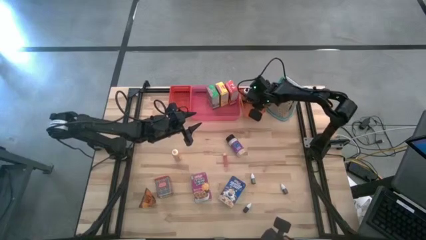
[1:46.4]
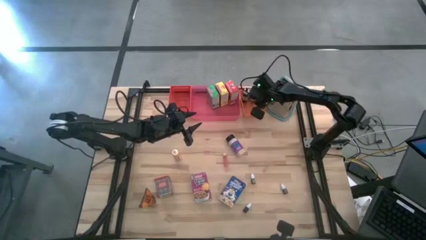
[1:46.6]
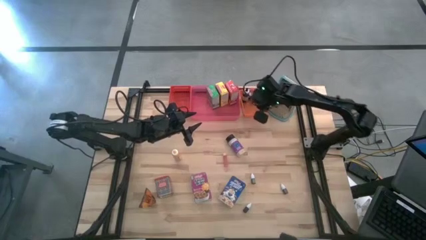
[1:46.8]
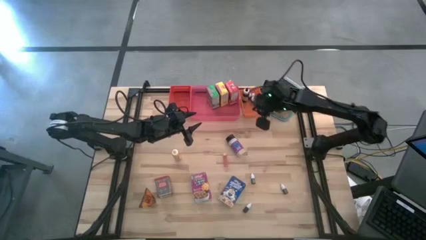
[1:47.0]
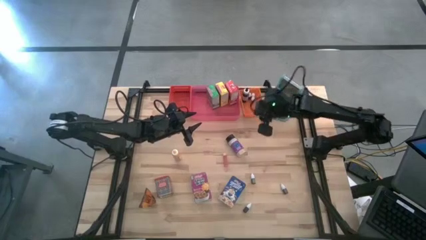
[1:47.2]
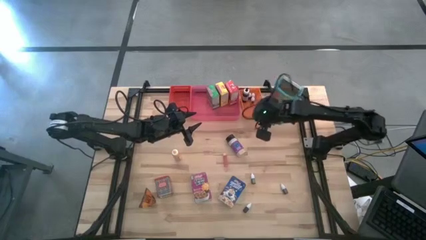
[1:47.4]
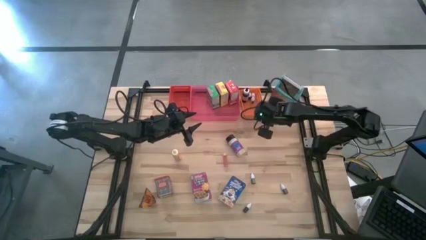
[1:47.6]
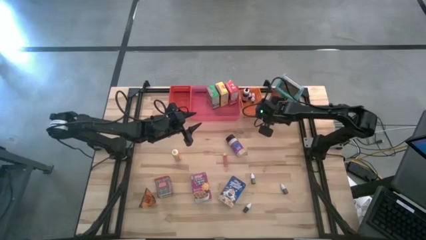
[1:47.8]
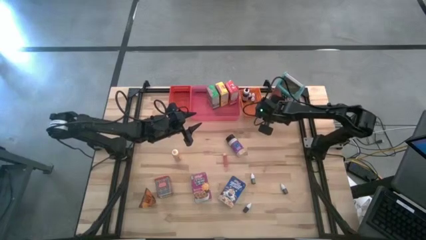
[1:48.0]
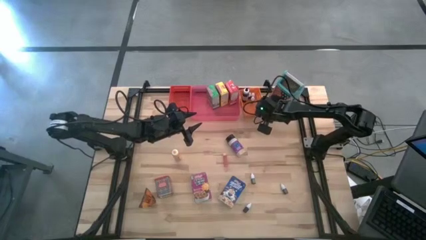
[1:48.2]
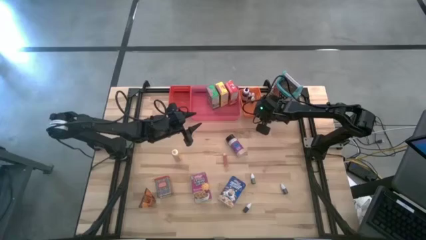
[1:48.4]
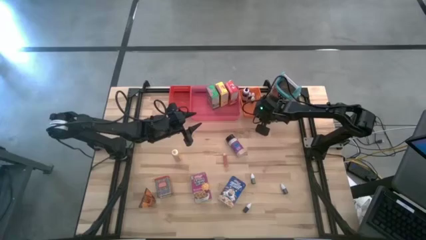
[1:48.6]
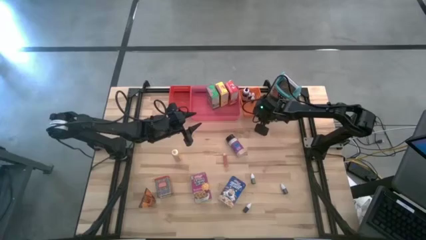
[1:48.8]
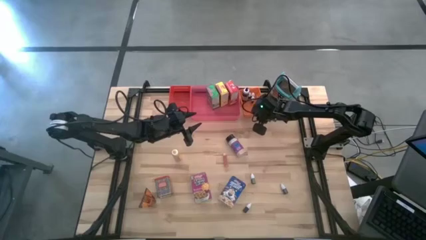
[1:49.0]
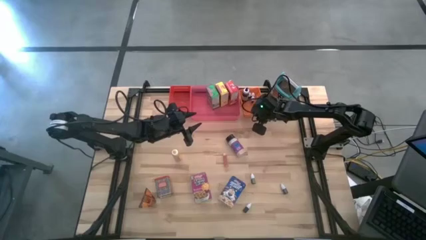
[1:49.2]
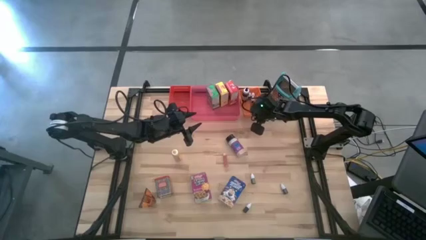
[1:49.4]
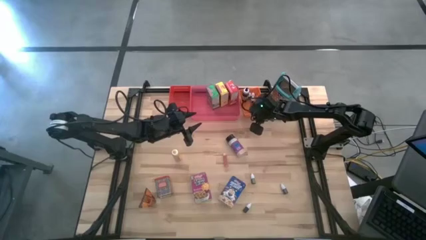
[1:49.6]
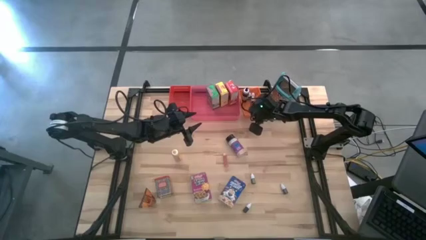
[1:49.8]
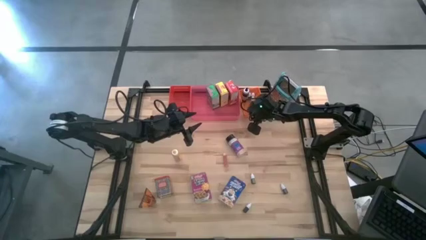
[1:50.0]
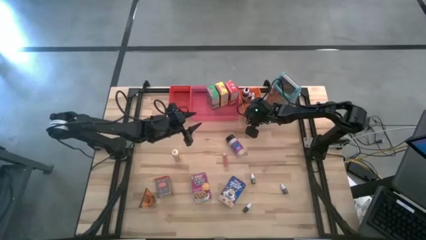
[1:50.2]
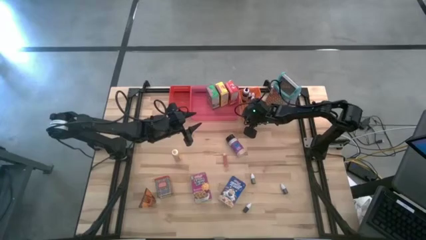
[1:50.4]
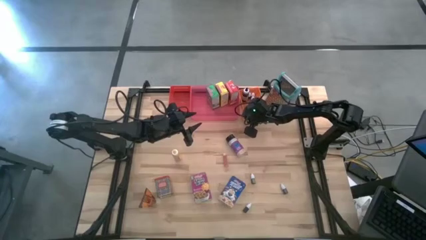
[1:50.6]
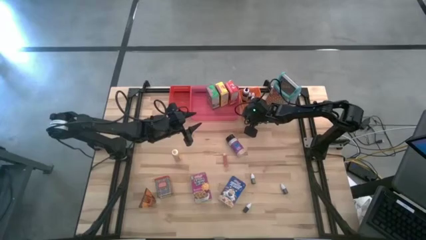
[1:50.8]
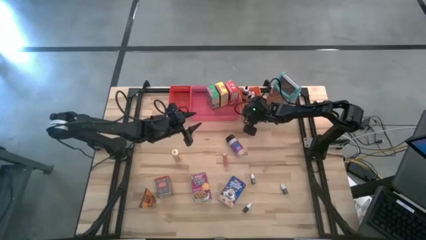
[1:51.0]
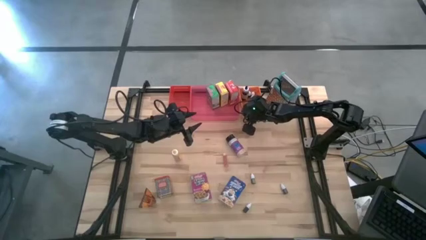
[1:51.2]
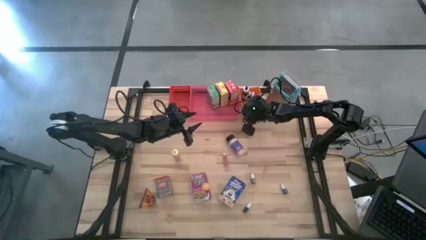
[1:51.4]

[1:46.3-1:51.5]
Task: Pick & Place Kitchen Items
Adjust the orange bin

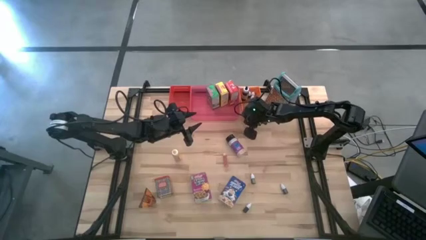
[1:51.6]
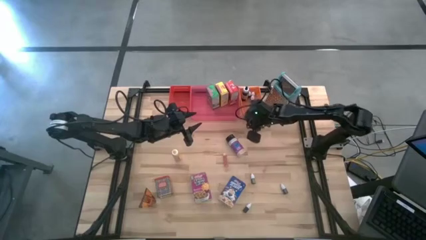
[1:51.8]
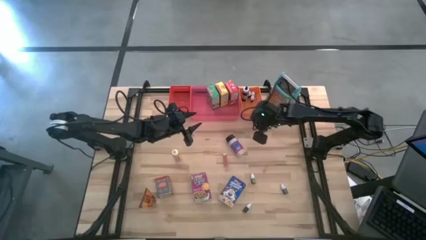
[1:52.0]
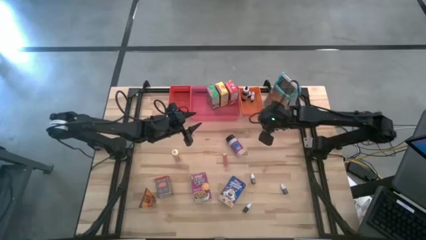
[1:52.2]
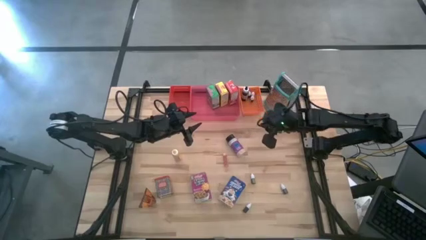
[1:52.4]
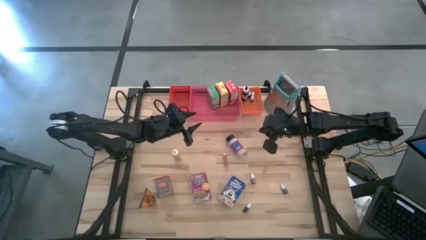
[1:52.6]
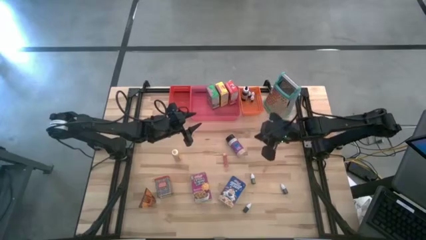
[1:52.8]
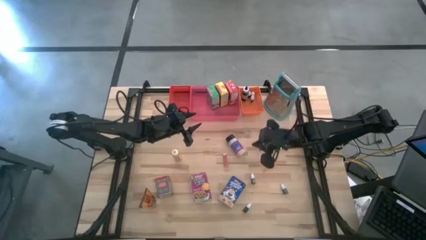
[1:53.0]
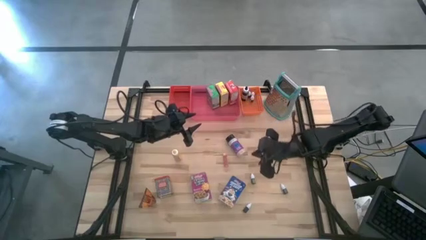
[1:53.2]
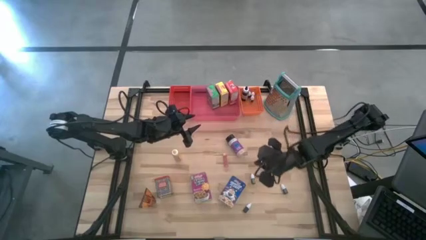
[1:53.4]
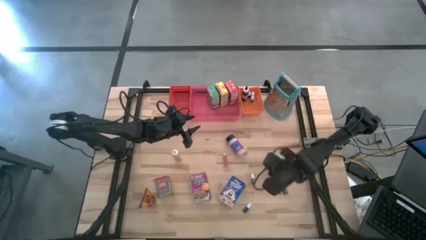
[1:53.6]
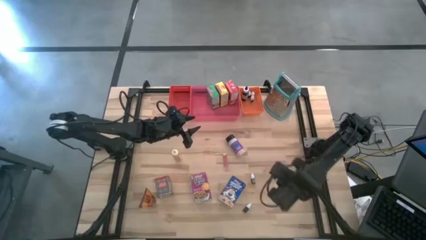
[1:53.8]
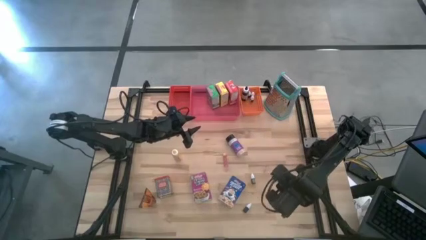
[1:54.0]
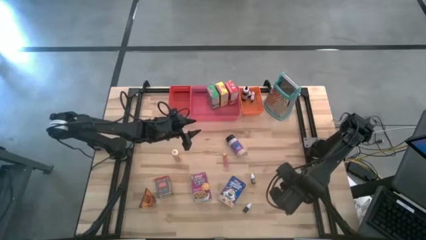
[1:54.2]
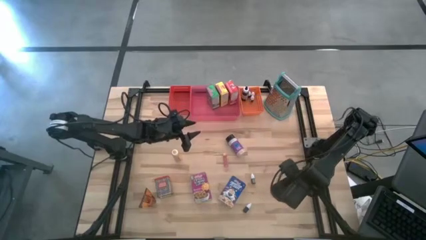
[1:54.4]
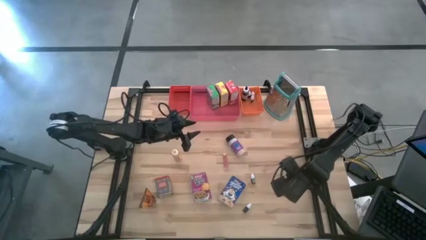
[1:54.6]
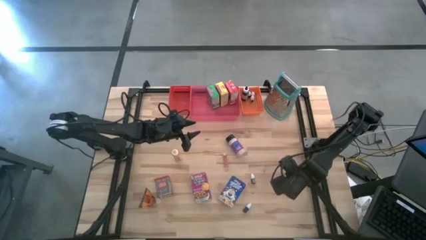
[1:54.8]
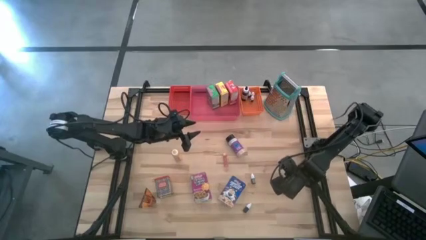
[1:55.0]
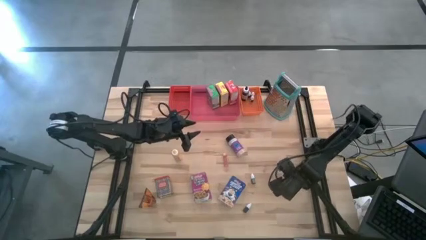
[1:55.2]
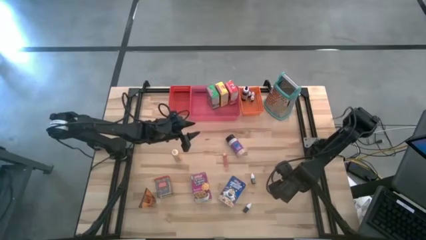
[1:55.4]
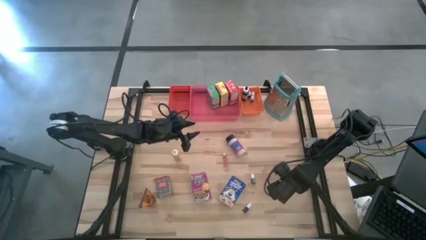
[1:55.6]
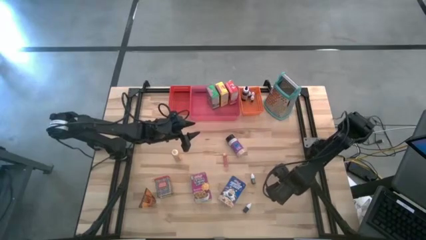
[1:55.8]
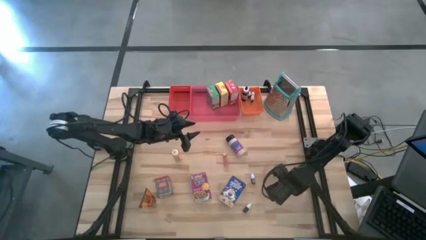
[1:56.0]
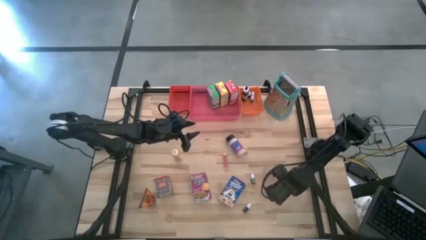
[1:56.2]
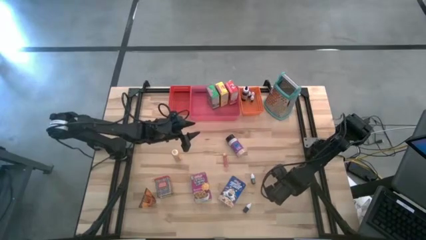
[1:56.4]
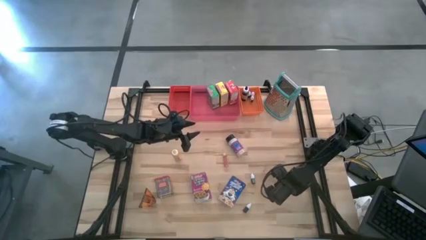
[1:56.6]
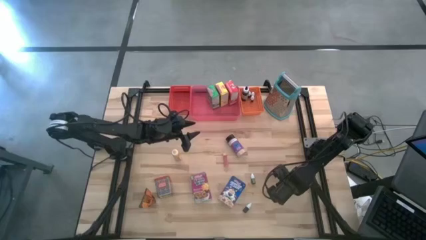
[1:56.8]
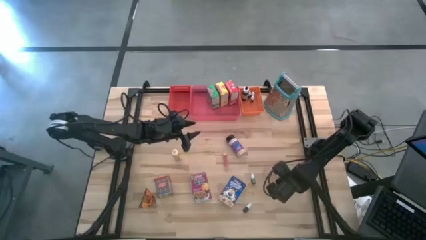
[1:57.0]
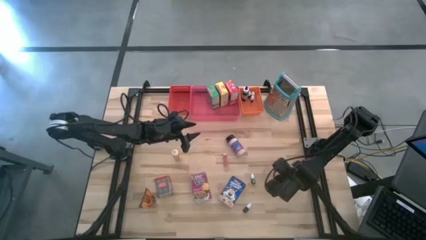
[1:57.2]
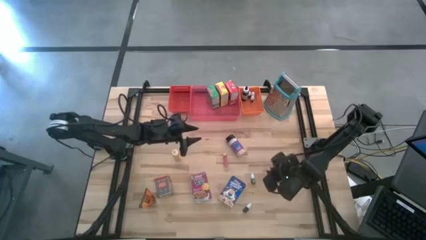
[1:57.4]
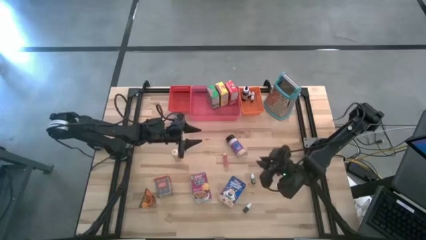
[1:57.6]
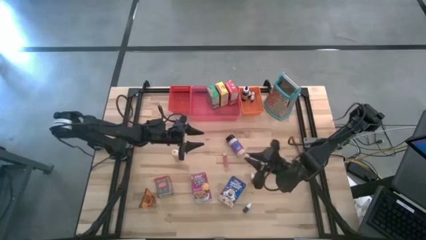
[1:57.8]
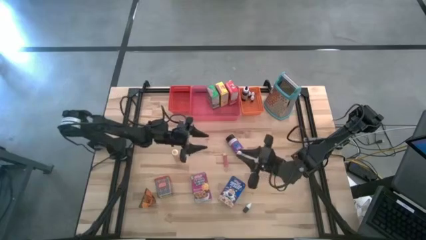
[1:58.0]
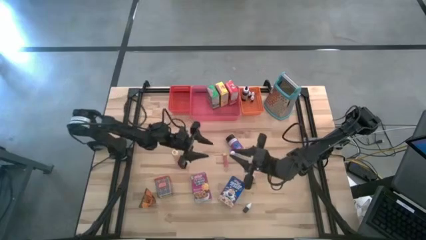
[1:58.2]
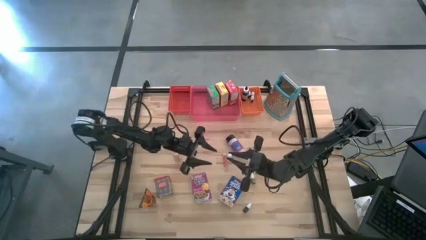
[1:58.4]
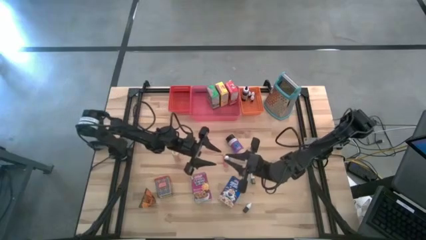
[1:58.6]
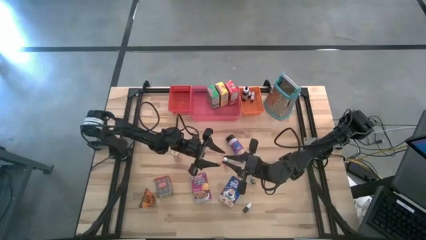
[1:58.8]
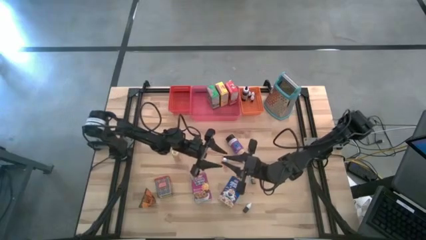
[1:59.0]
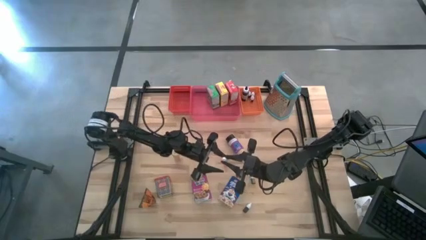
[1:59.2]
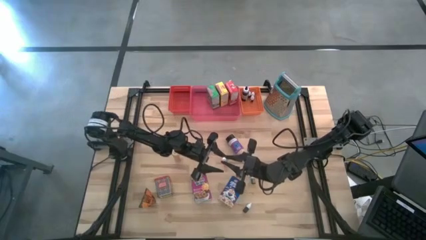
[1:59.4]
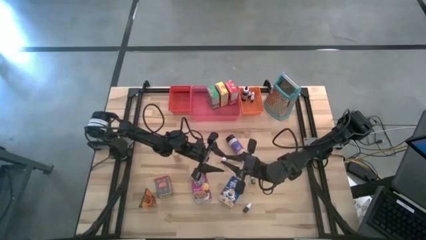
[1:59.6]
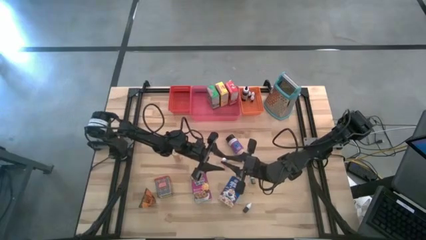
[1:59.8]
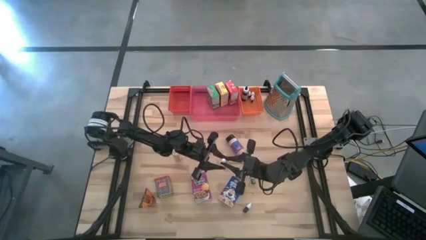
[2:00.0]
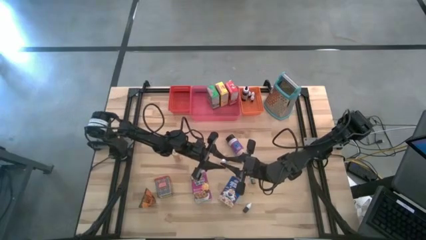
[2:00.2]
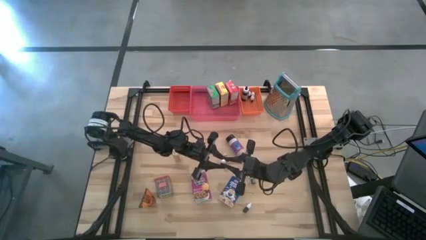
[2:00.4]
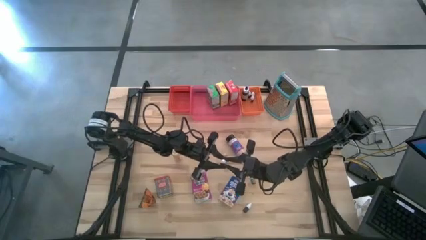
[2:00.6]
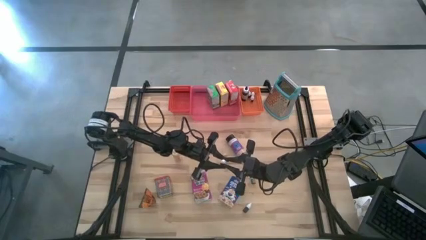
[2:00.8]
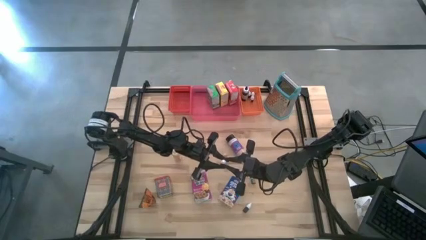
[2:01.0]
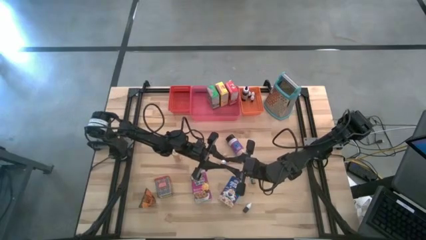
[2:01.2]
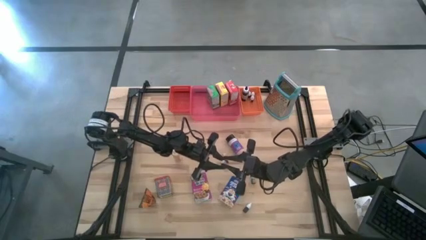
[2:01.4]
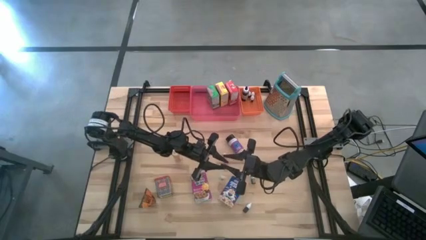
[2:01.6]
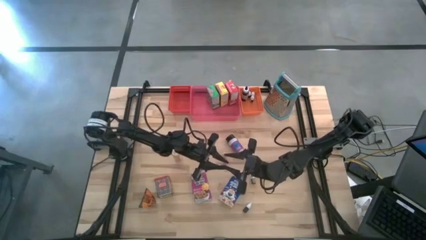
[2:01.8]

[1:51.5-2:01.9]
Put the purple food coloring bottle into the orange bin
